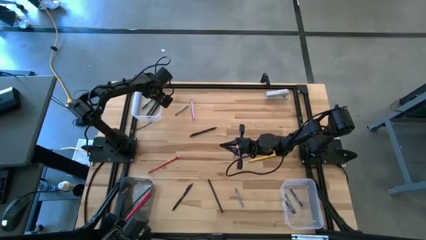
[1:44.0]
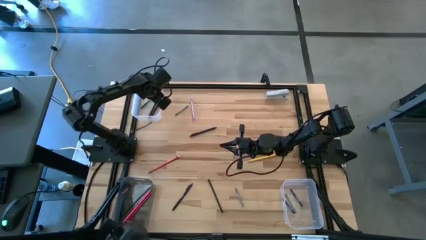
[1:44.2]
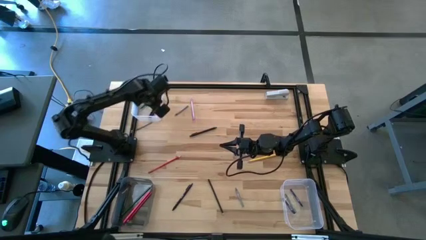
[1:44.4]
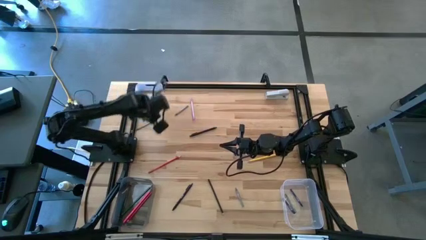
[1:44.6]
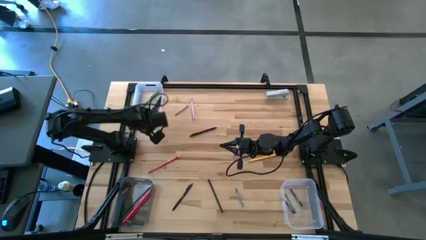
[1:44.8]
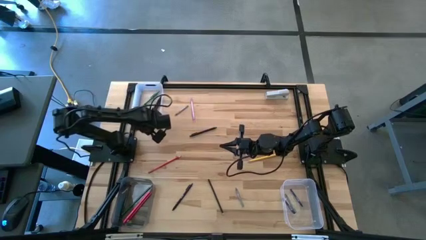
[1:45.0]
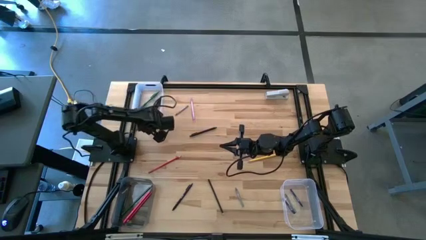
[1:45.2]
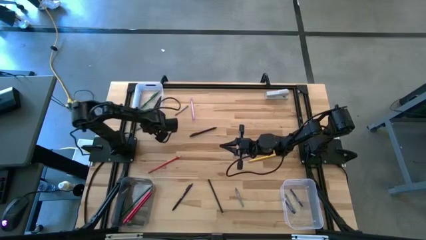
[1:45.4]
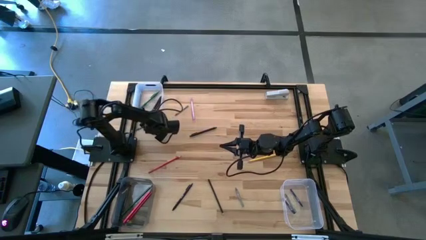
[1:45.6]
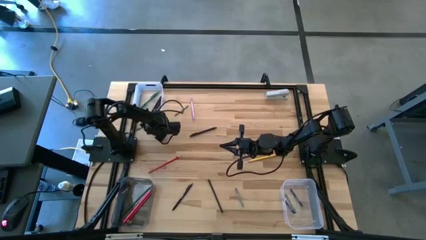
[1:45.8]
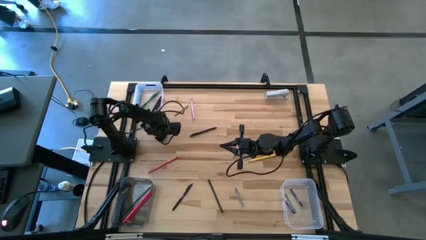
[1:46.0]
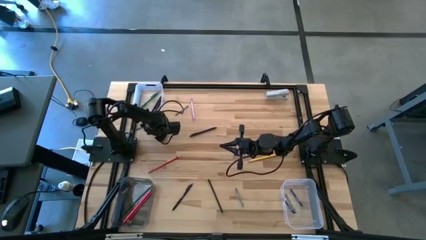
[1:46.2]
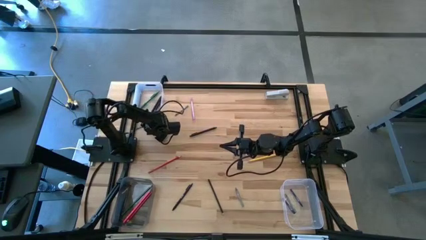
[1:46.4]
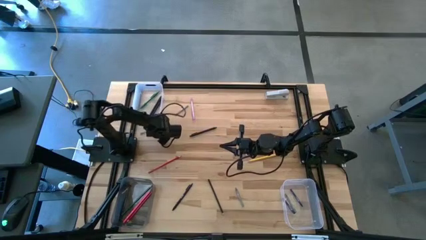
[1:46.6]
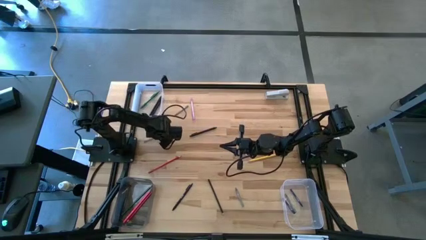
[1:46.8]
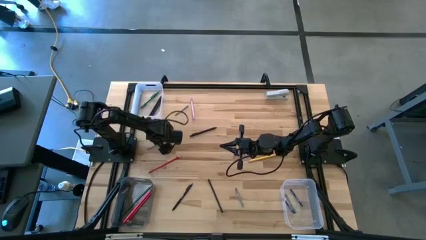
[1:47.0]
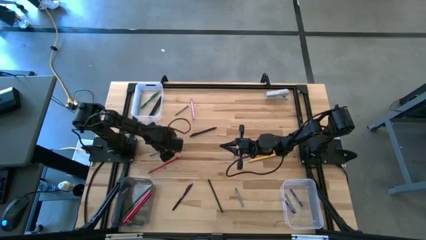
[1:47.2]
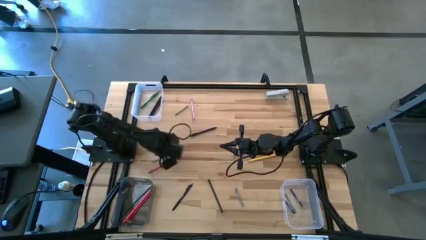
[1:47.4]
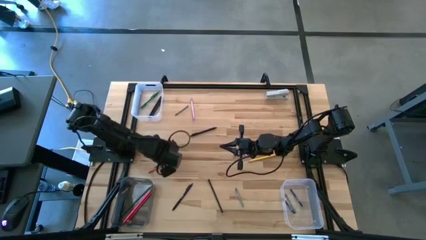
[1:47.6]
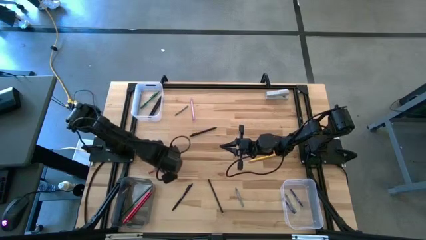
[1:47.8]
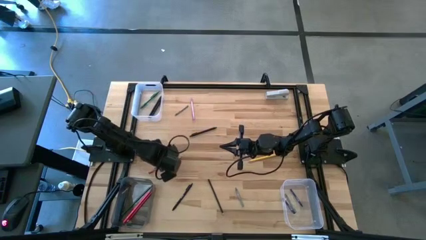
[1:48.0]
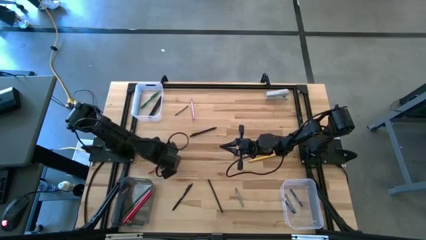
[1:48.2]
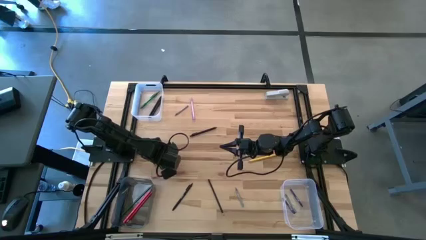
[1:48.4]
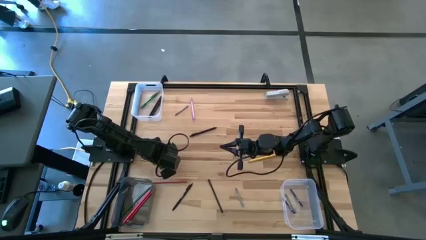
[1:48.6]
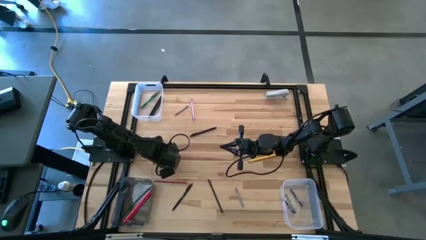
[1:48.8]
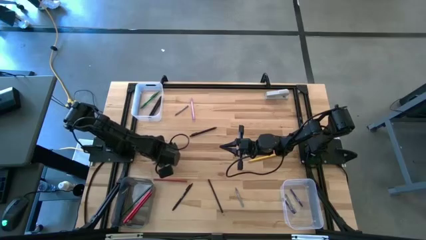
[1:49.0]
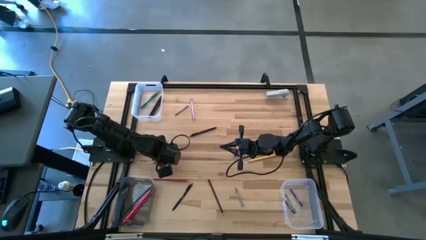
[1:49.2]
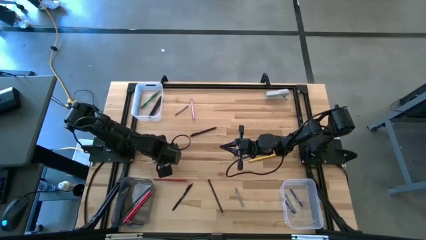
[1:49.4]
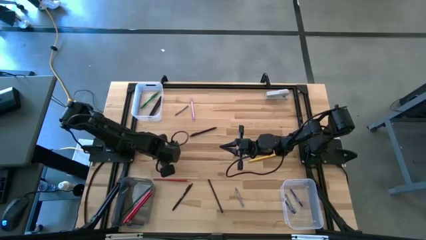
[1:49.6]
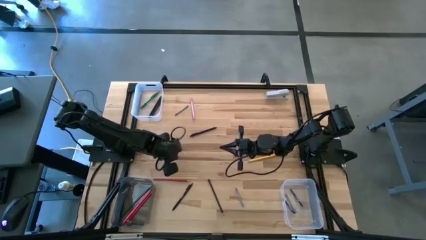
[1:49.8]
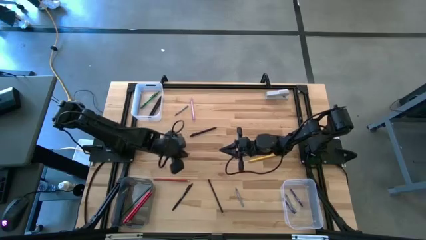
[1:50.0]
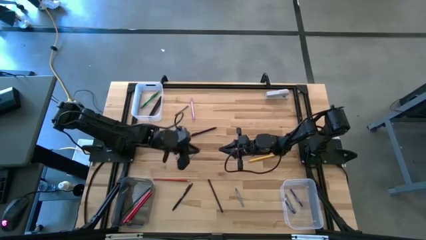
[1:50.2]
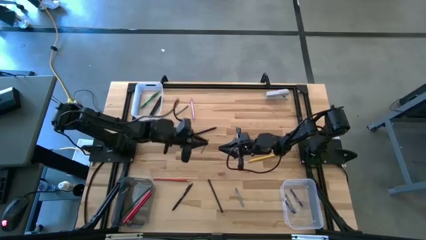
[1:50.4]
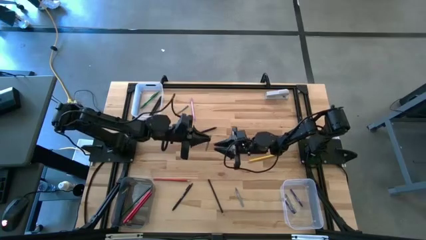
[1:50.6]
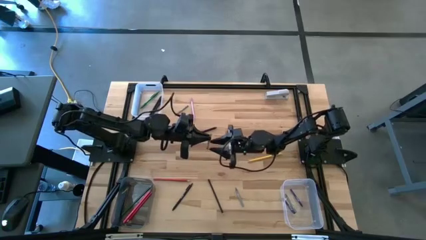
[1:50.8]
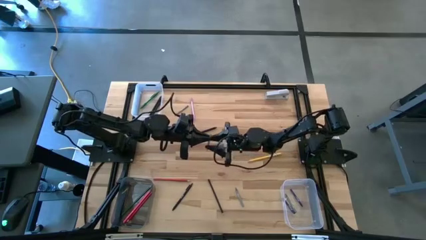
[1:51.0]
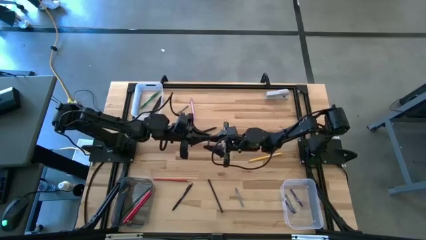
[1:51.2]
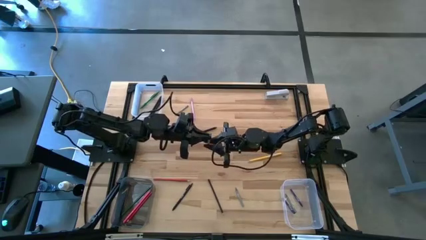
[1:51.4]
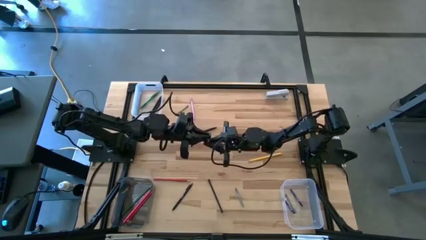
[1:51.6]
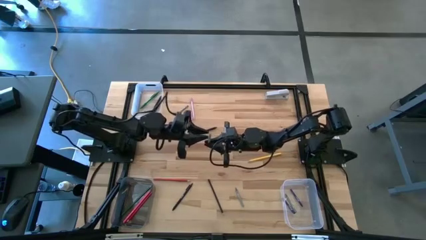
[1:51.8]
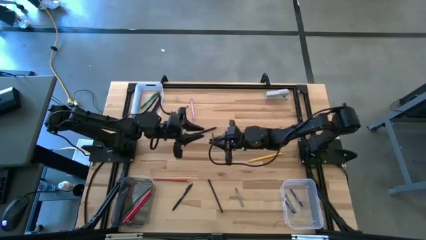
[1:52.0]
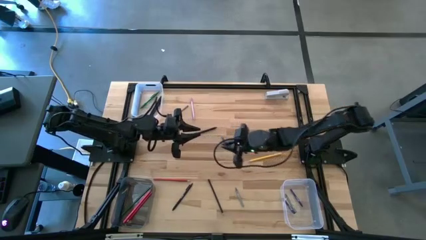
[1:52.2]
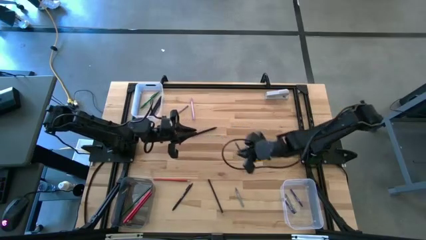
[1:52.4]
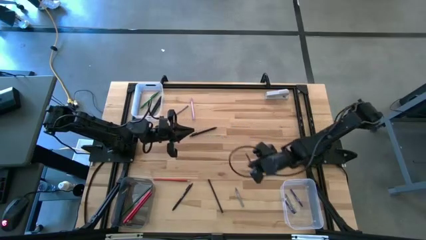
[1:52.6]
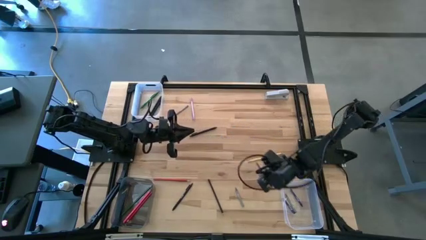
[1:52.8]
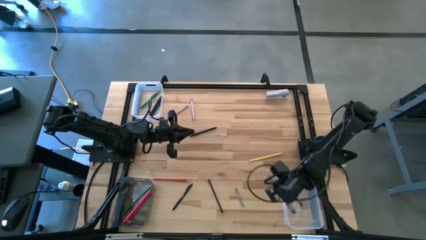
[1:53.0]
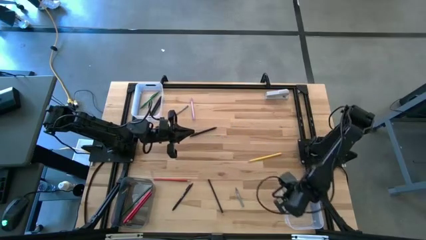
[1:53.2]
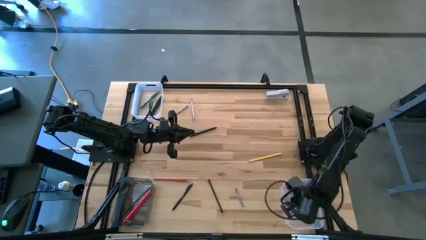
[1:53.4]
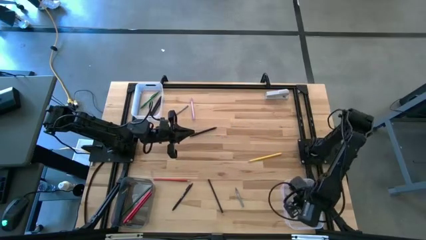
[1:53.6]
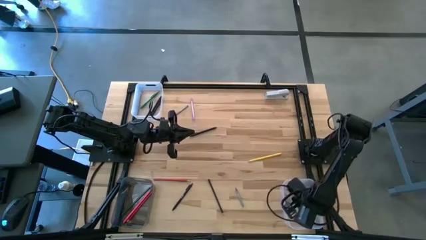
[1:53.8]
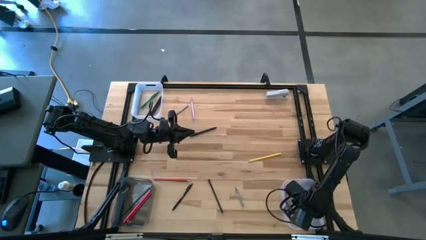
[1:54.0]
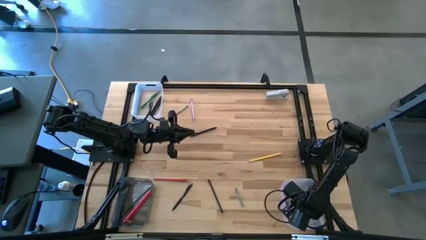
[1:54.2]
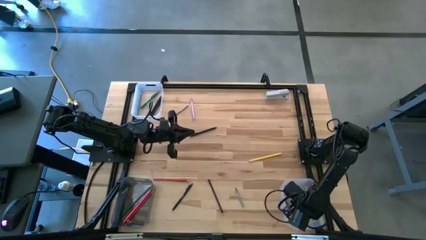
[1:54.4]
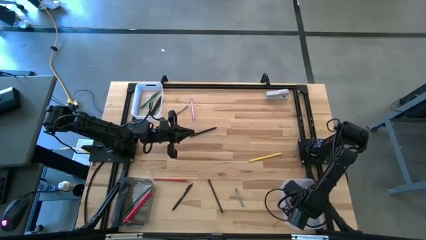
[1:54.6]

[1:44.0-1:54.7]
Task: Sort crayons/erasers/pens/pencils in bins
Put the middle gray crayon into the bottom transparent bin

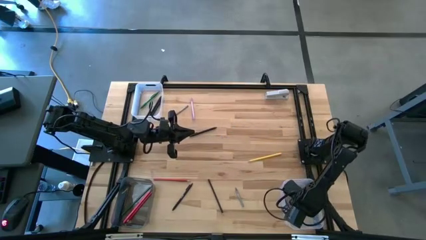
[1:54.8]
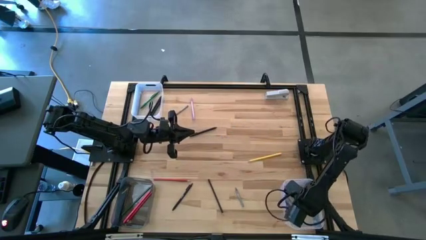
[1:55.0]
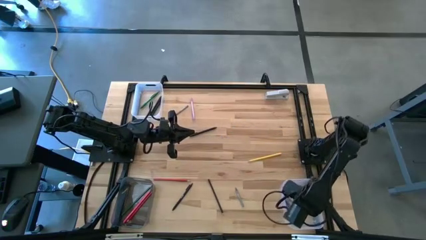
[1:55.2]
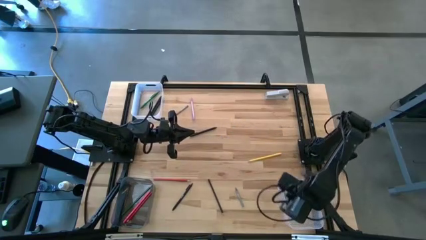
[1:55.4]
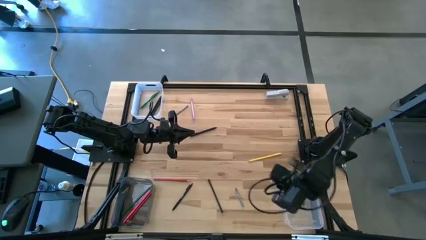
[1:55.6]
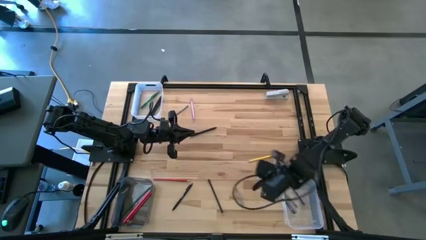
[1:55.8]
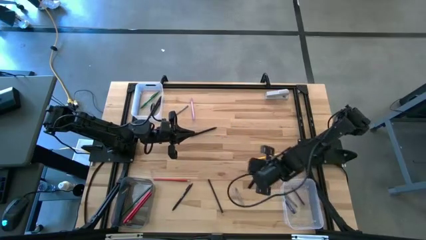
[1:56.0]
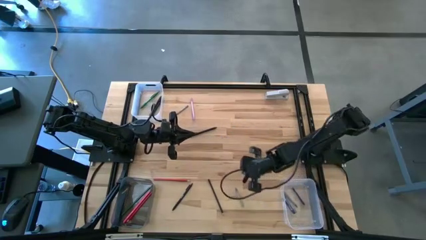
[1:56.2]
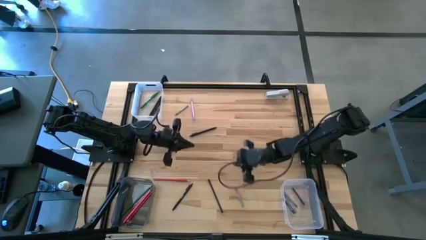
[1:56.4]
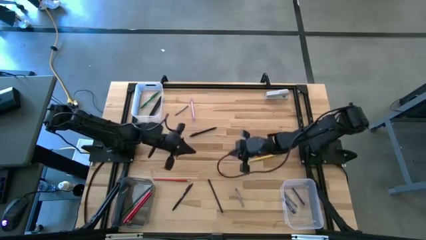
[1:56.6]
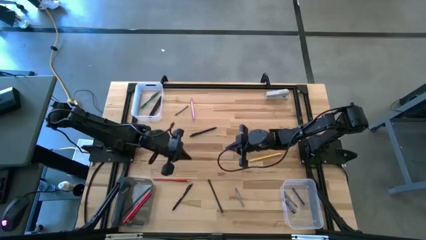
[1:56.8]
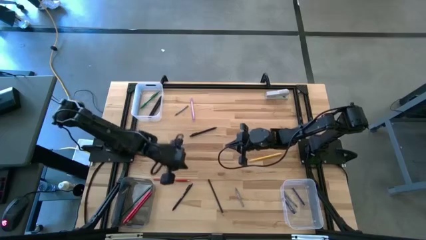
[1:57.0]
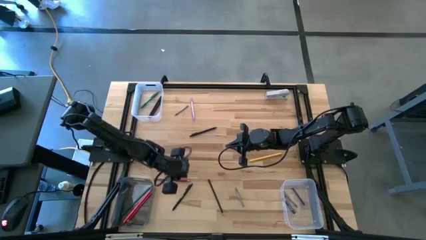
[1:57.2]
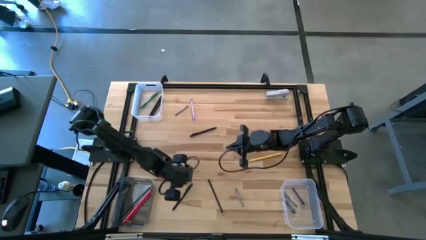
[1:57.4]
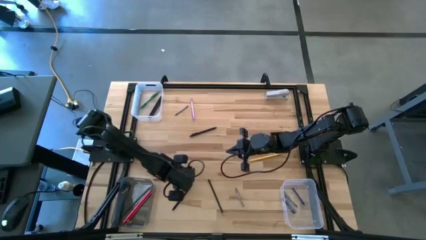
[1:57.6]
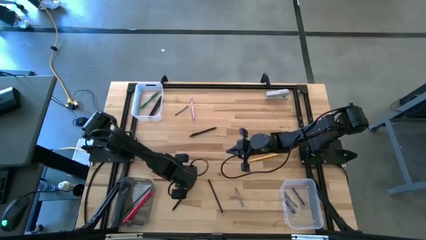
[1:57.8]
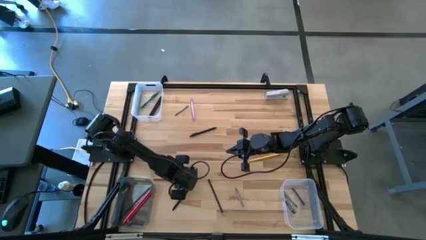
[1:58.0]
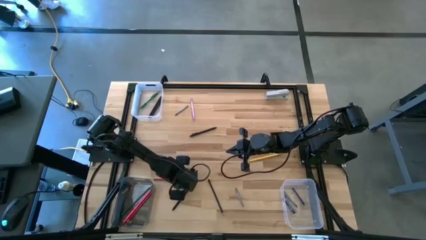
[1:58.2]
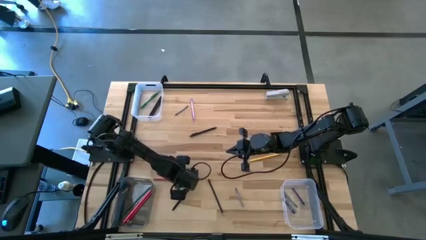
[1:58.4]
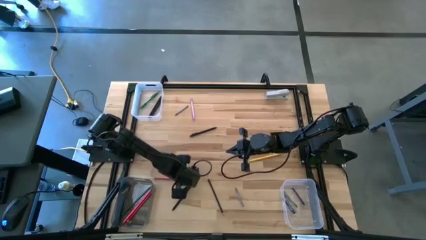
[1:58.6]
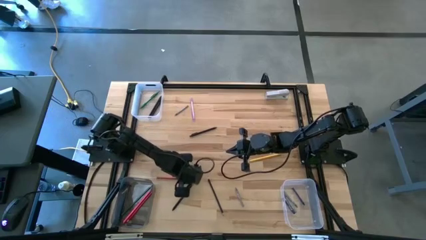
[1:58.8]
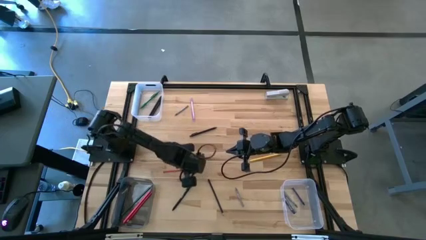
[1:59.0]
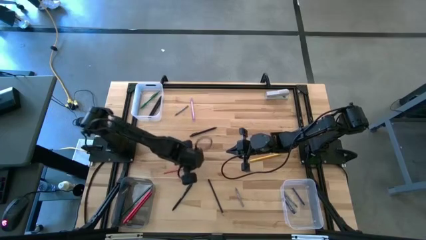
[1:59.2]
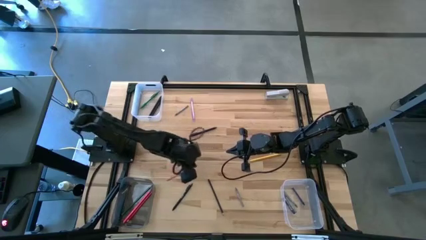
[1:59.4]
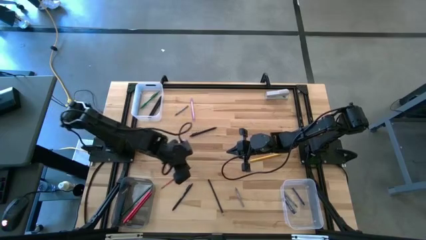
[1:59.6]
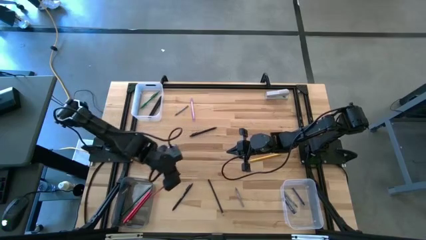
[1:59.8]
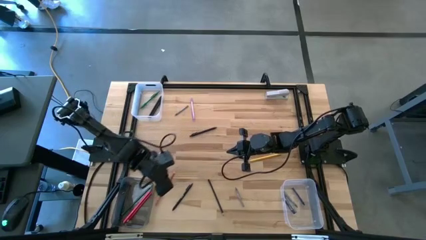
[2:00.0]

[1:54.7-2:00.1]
Put the red pencil into the black bin
